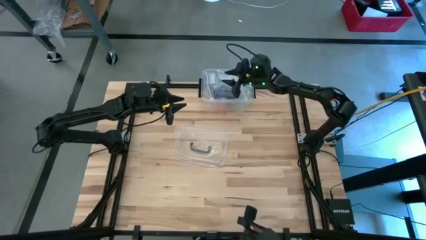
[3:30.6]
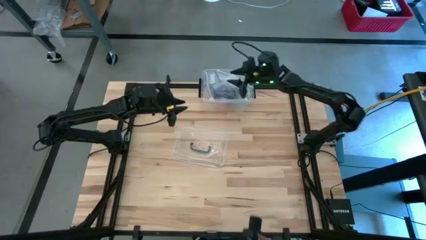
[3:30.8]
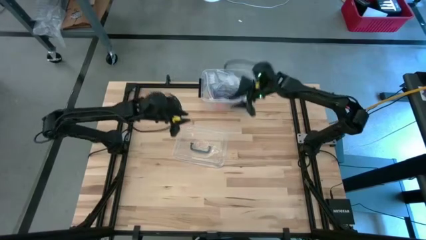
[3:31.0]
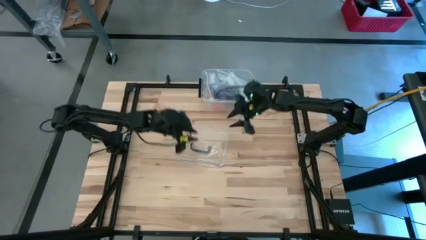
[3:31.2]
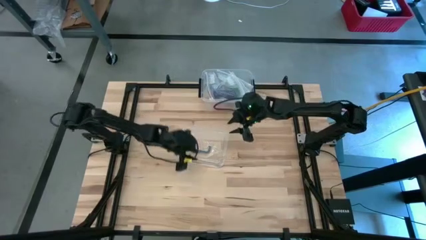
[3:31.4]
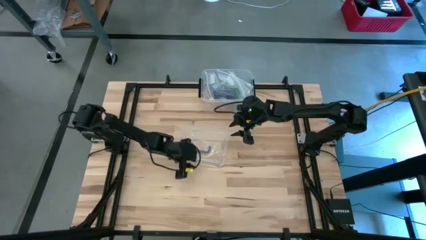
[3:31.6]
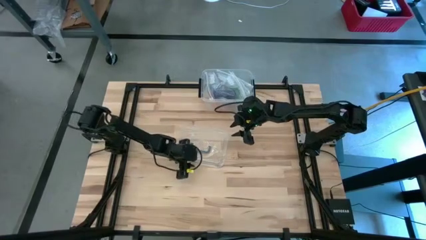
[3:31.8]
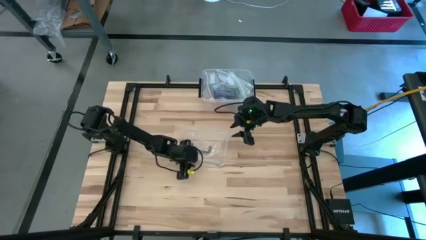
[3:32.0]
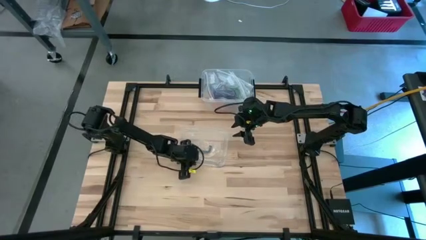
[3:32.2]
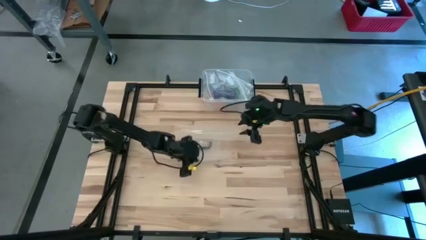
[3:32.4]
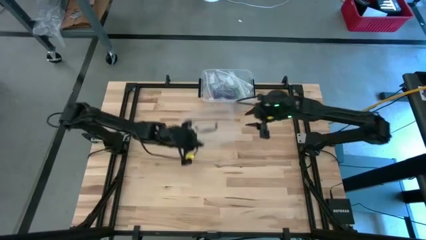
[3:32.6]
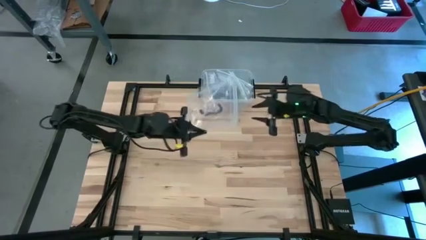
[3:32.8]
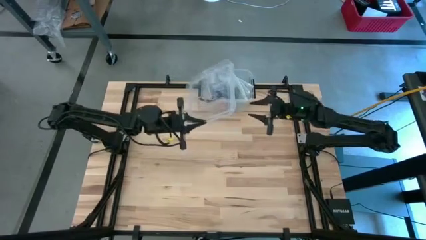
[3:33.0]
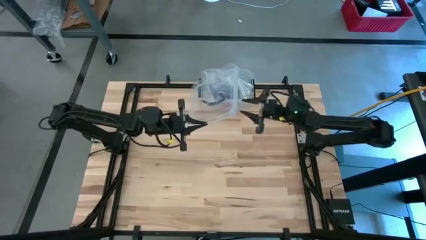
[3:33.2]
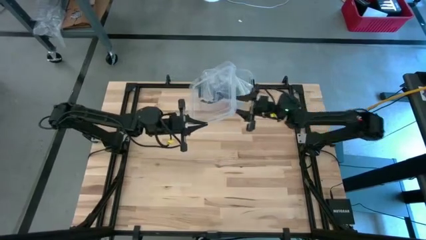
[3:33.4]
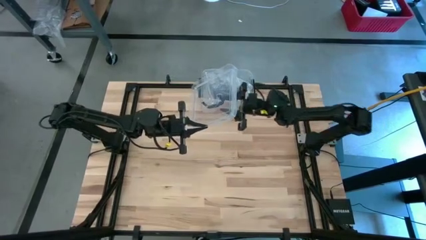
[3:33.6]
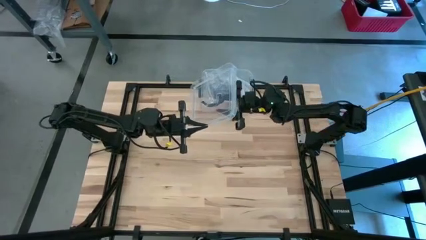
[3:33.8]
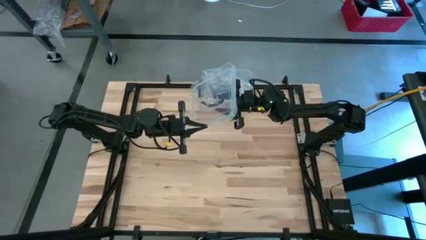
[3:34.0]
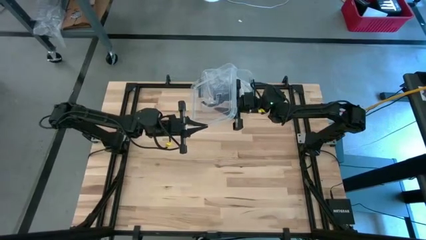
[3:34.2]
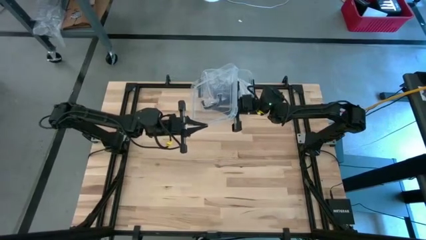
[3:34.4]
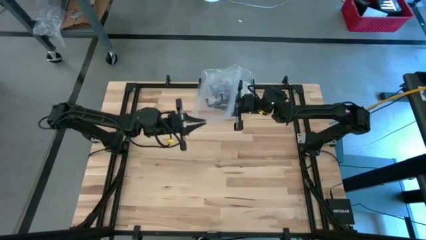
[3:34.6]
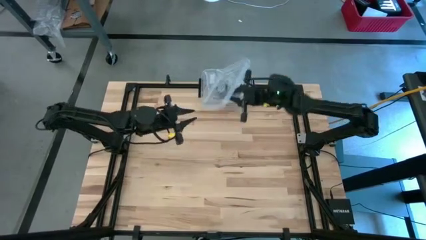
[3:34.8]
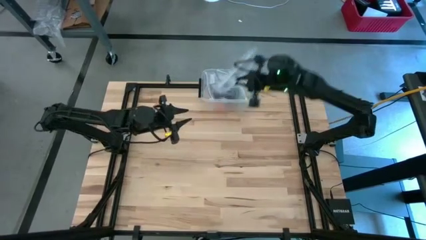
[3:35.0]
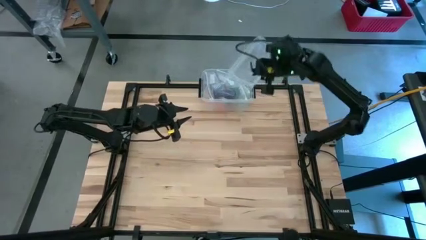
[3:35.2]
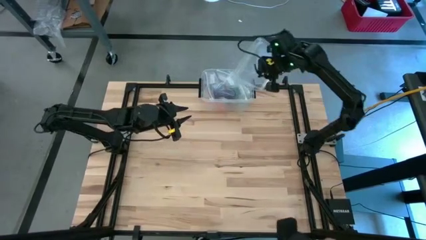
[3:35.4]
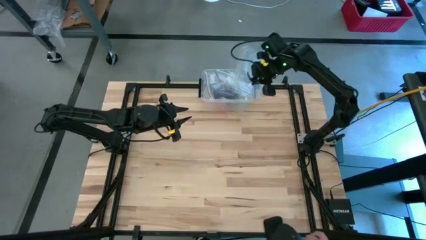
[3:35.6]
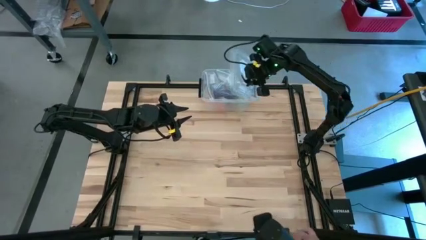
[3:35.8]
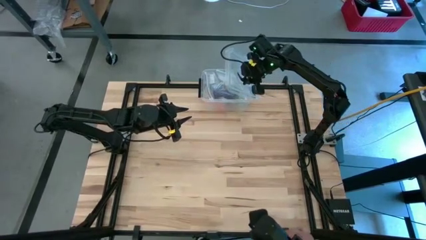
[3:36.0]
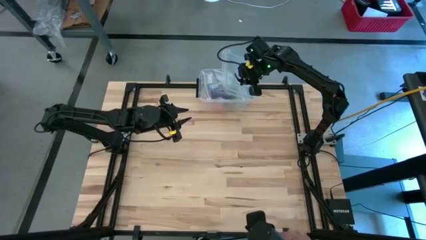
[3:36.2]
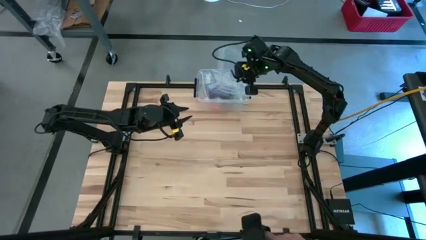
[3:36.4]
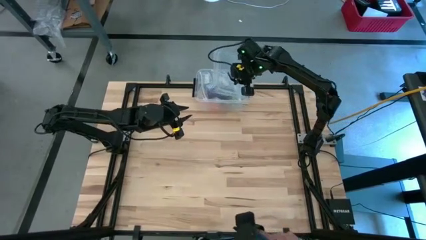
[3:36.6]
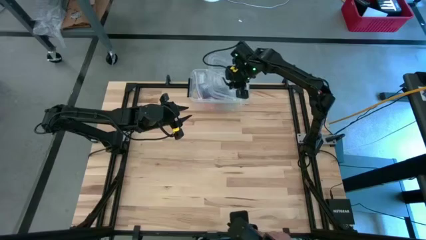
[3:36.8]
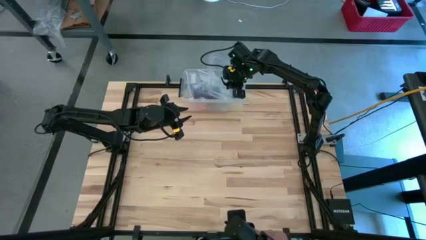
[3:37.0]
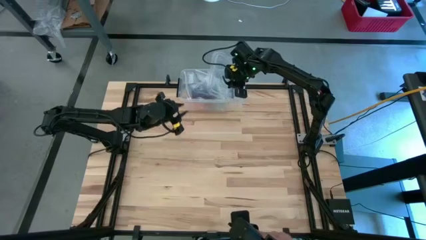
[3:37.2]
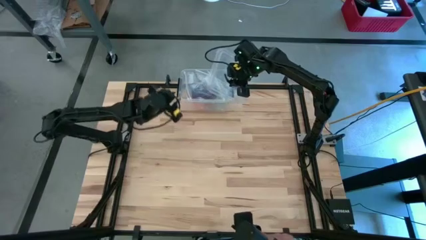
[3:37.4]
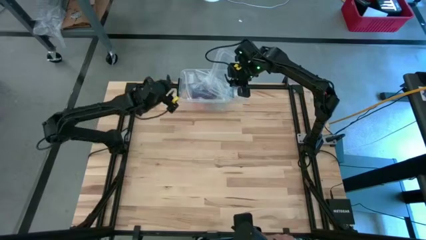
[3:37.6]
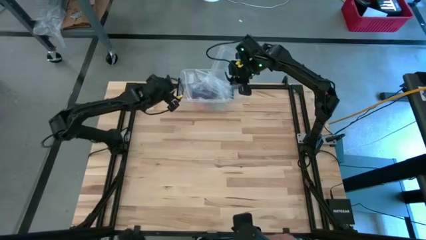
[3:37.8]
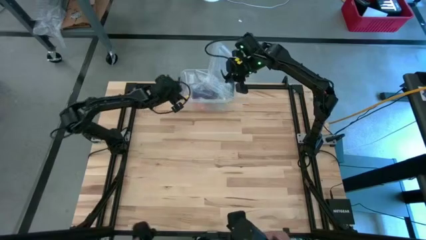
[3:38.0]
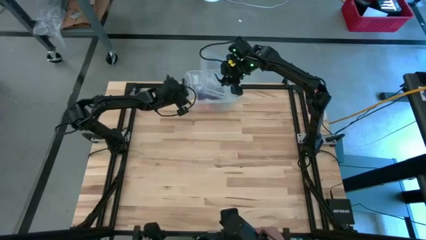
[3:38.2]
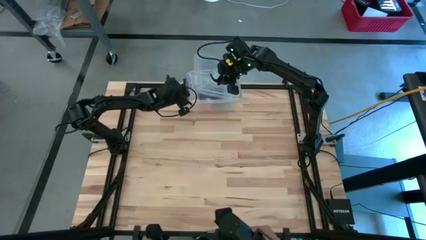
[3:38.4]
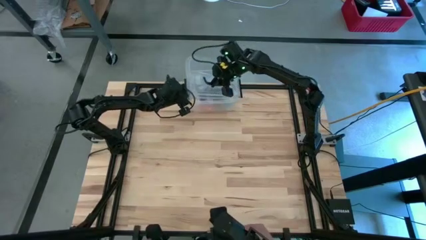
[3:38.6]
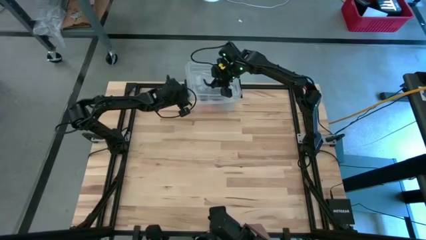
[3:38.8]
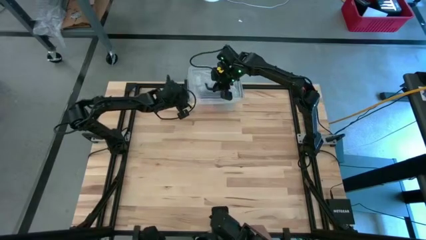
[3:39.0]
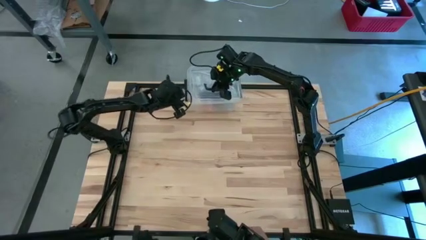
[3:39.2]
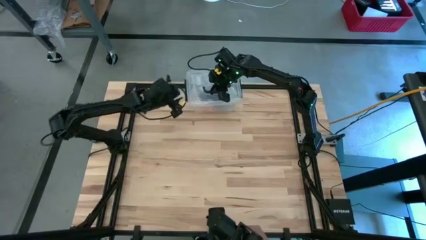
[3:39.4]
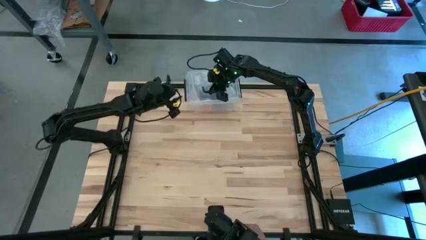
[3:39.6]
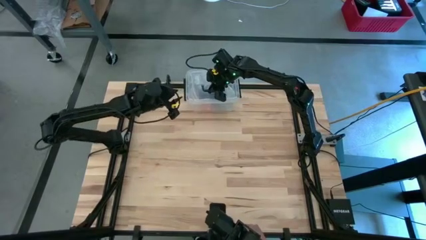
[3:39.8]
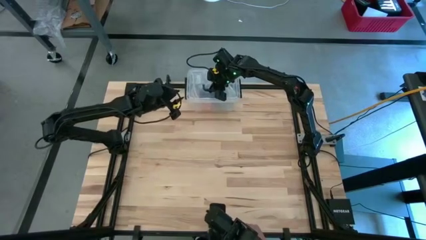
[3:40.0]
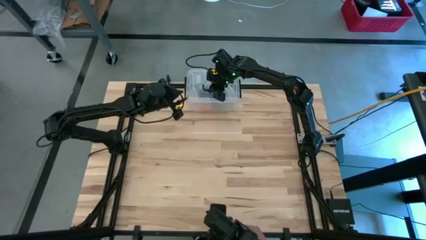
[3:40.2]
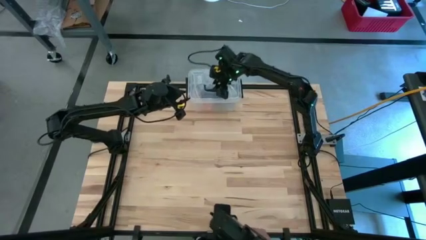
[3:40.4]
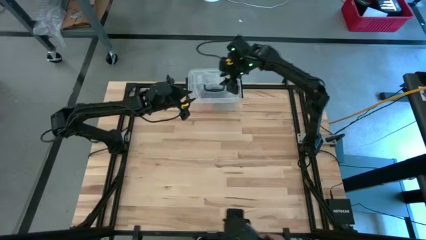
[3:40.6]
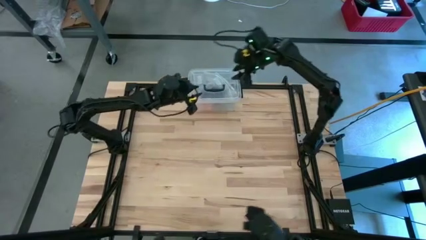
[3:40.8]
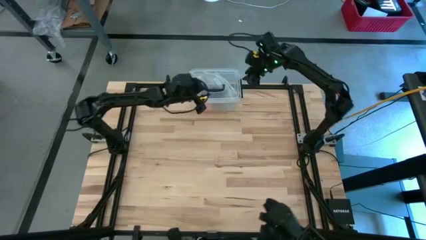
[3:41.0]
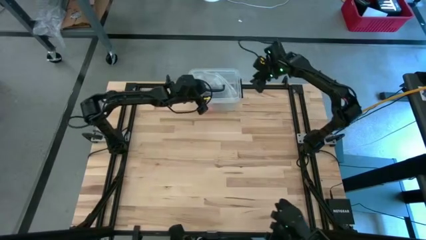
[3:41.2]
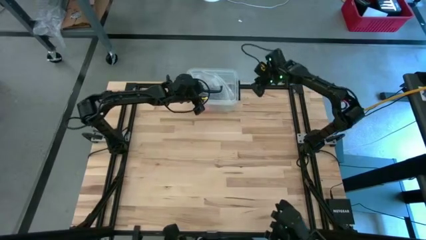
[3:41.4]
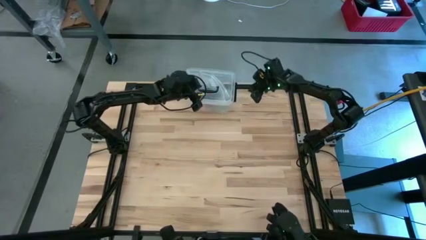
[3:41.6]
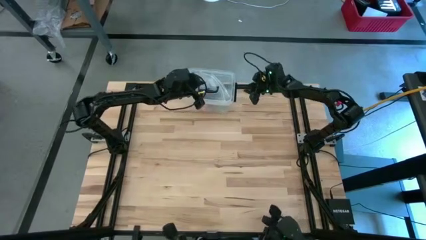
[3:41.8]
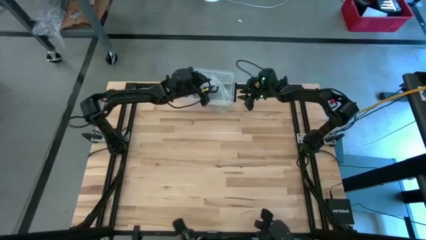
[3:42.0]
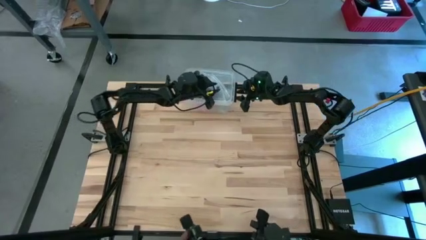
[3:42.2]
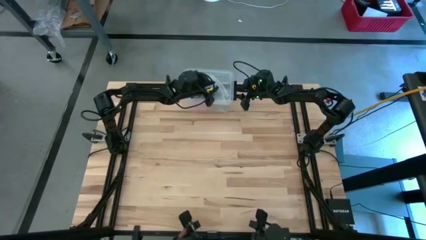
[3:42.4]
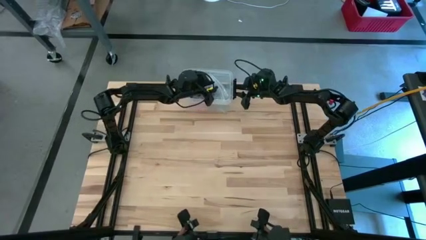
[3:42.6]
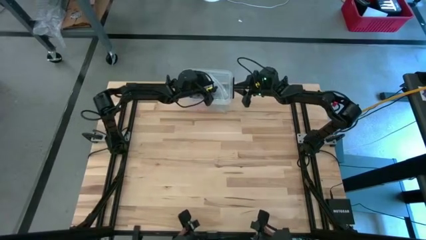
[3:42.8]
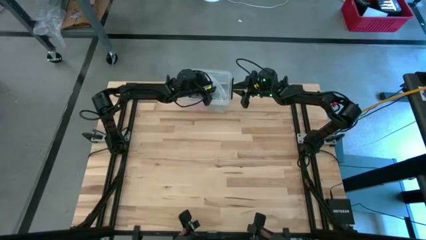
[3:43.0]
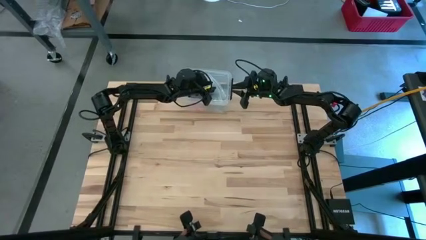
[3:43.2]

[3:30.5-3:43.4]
Task: Roll bandage
Close the transparent bin

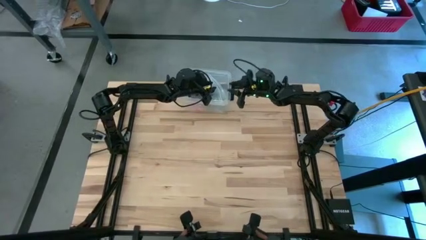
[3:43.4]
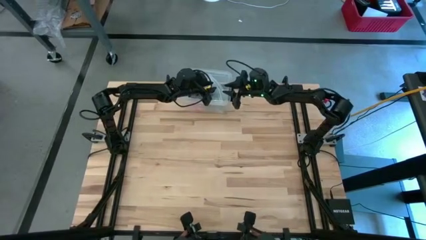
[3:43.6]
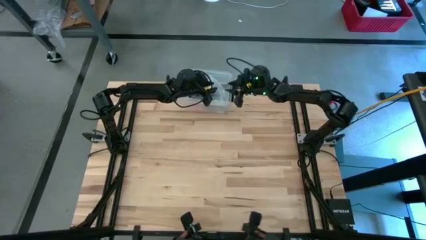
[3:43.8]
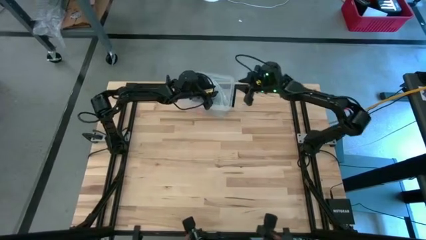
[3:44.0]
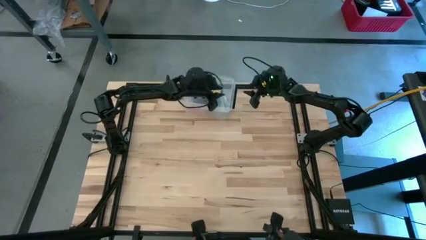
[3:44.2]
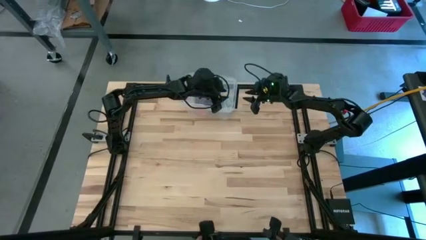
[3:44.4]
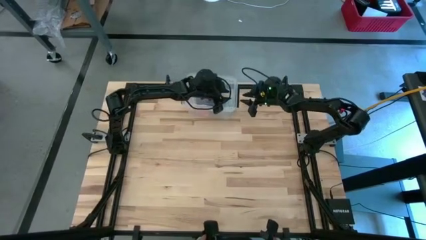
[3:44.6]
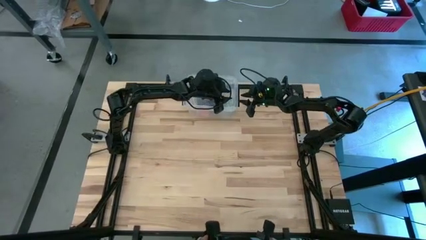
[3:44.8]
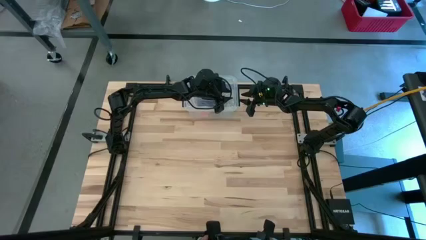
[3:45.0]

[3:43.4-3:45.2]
Close the transparent bin

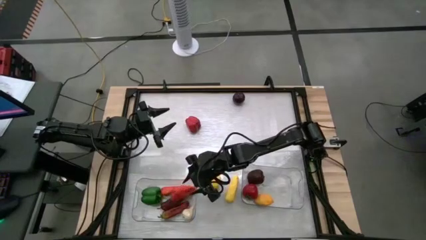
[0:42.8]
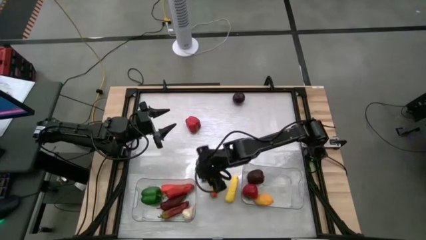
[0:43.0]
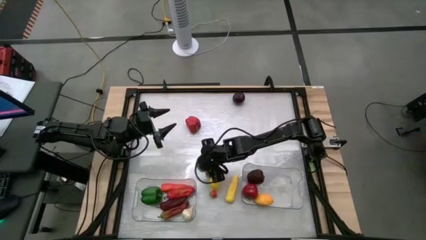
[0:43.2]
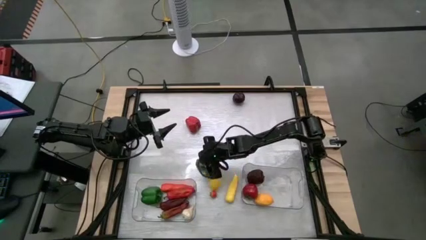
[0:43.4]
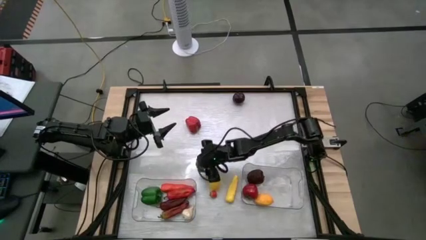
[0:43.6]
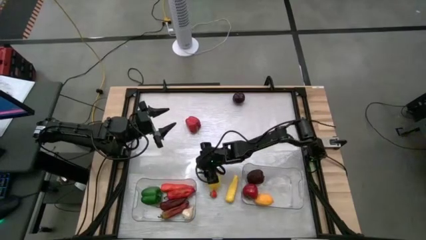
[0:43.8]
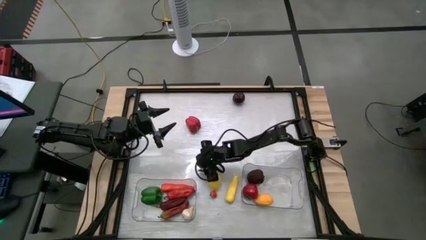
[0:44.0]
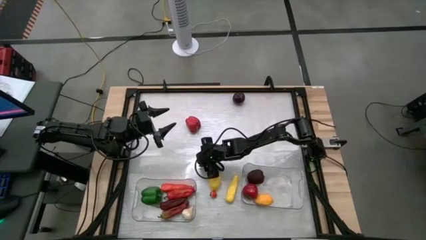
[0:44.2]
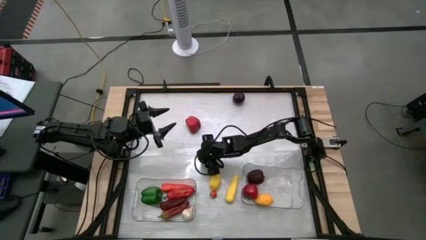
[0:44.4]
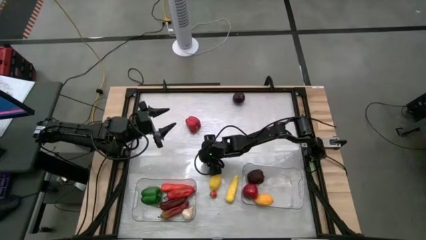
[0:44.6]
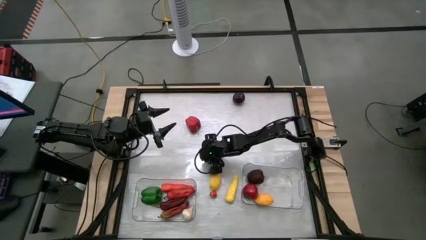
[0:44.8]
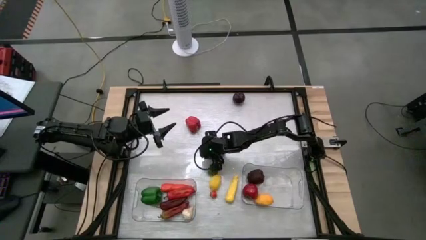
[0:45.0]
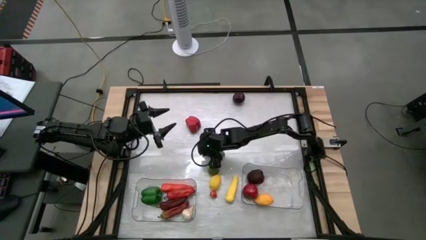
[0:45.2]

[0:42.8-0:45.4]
Task: Sort produce into baskets
Put the top green lemon into the right transparent bin
